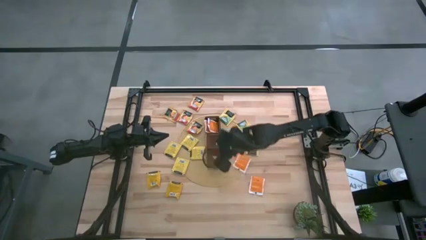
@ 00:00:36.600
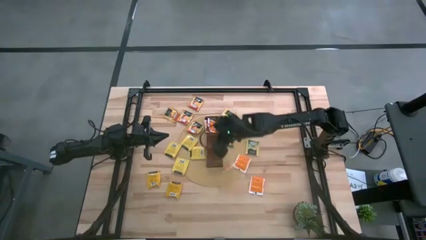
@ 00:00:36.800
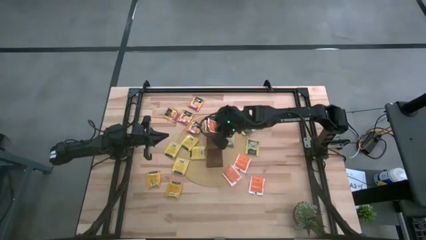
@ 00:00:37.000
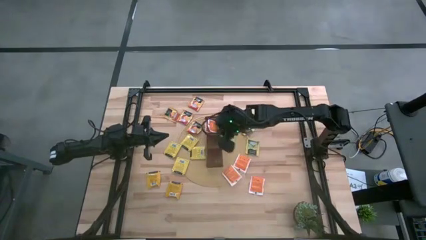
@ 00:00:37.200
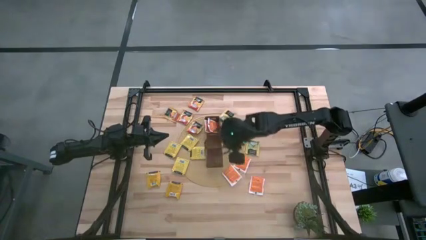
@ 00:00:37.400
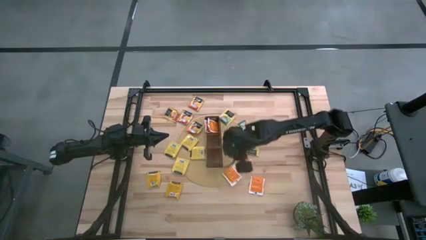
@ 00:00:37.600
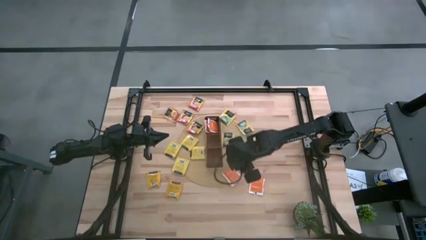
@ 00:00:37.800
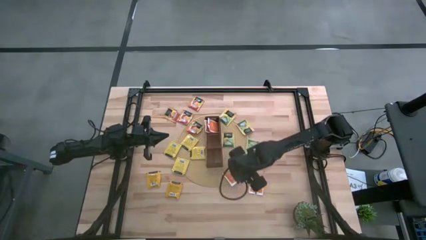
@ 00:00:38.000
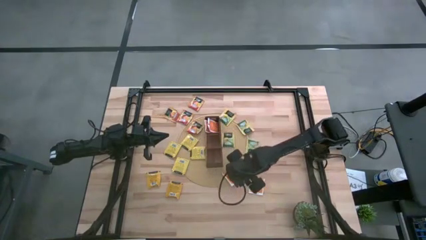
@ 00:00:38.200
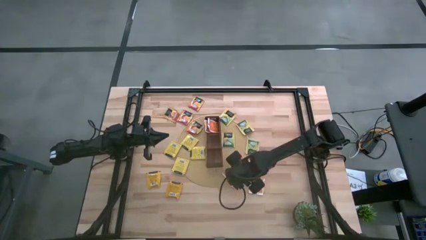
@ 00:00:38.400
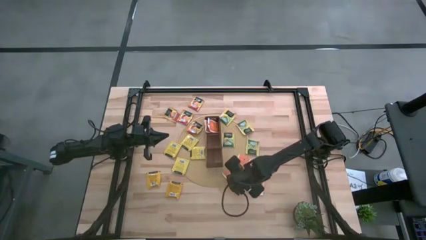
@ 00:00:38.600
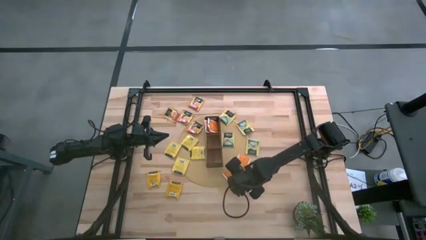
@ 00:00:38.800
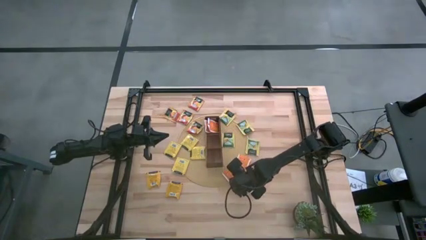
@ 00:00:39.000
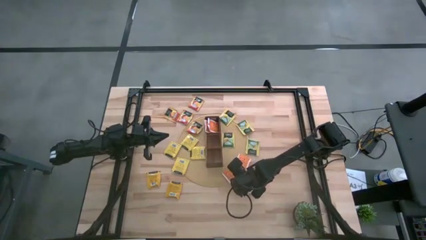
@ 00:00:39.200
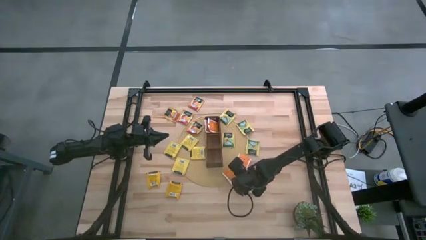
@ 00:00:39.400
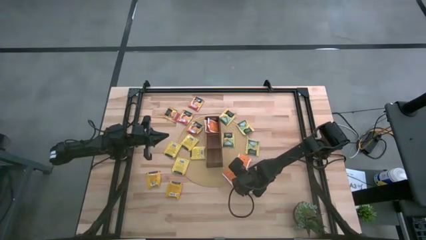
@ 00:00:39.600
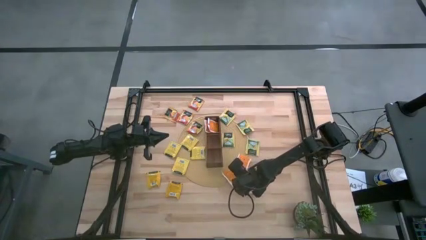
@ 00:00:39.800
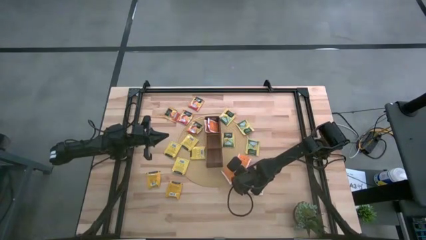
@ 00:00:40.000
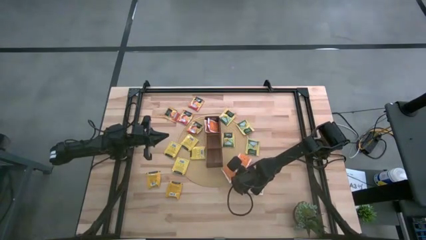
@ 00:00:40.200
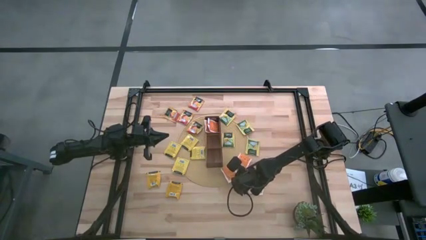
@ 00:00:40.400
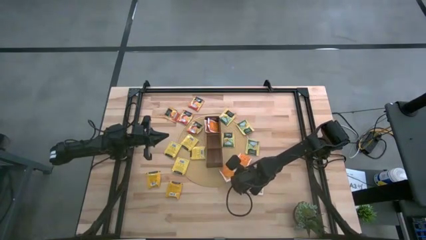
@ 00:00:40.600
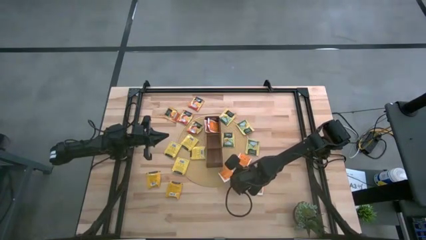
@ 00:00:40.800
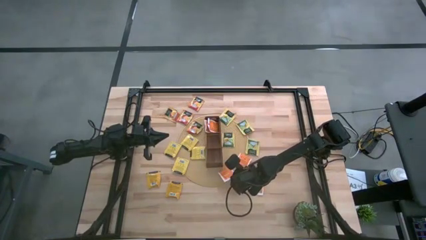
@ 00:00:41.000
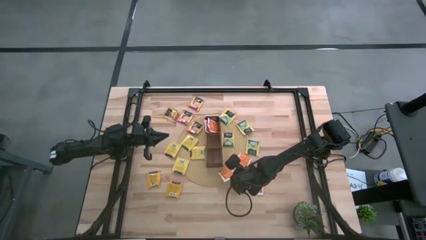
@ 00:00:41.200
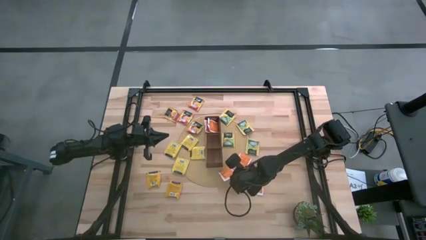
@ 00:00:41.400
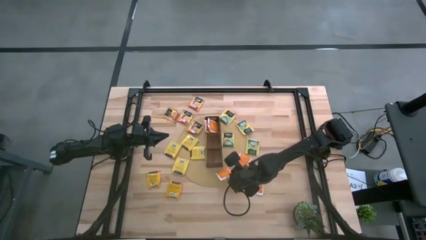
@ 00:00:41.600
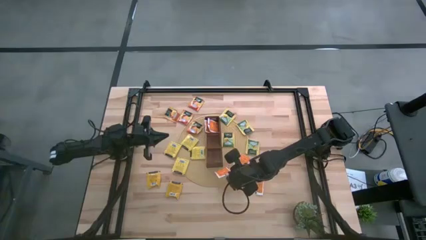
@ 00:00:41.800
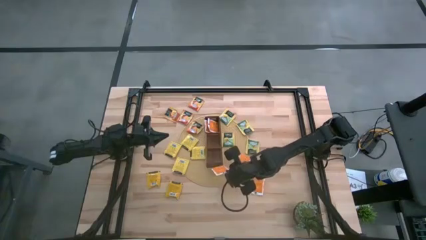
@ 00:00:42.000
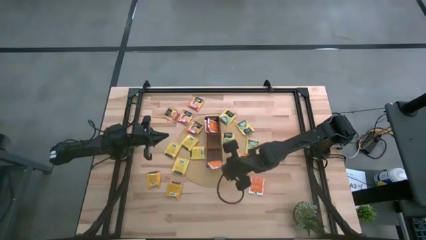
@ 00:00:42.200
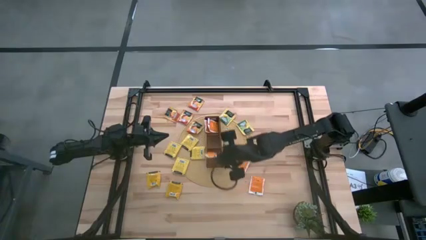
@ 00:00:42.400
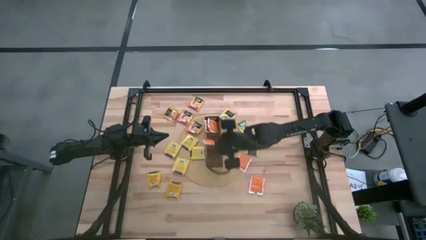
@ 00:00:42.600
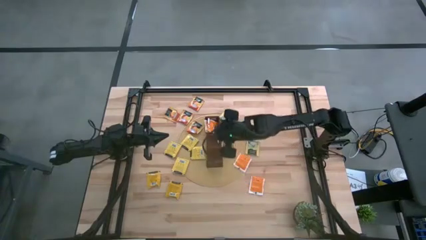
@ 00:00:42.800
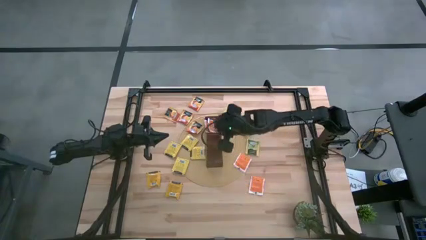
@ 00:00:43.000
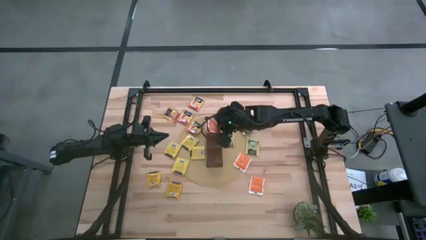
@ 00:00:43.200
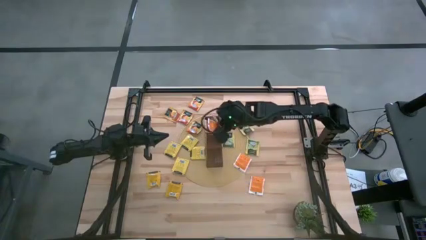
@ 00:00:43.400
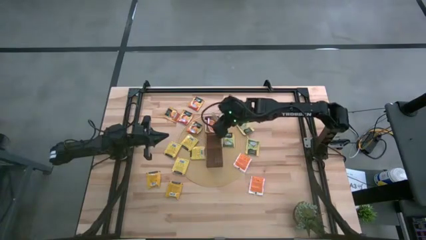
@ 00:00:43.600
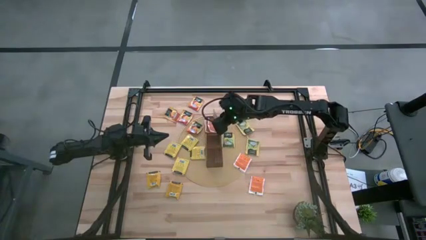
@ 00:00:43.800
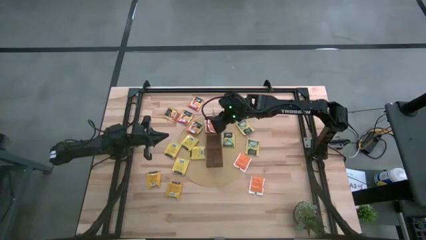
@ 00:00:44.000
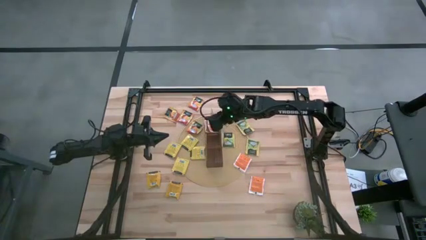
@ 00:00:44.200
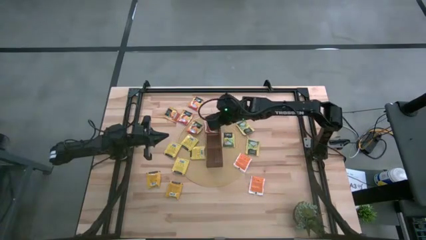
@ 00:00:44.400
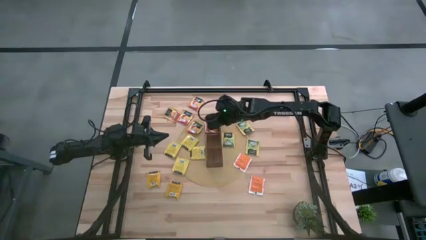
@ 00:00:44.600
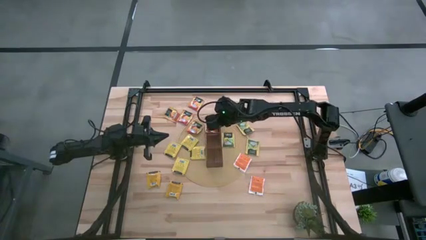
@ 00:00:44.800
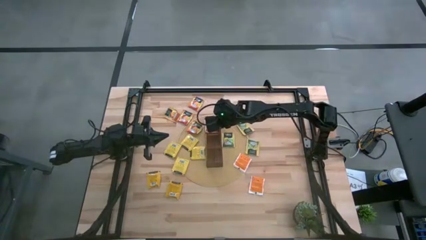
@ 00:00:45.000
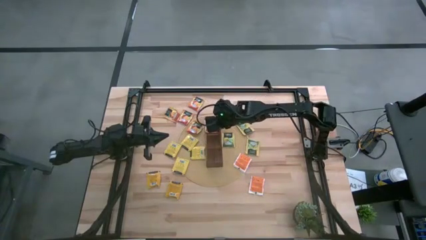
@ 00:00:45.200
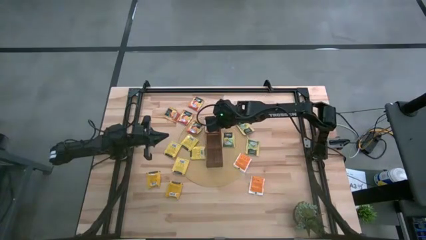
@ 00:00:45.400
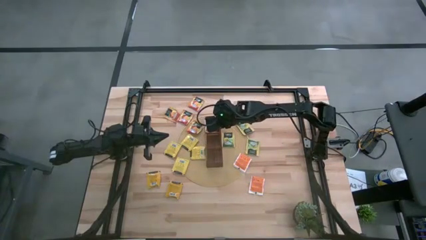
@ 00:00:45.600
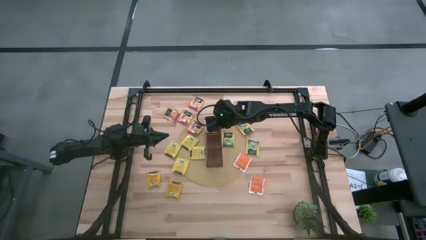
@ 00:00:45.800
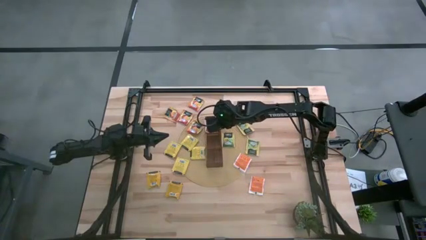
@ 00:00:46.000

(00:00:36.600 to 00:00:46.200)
Task: Pick & Place Tea
Put the bottom white tea bag into the top section of the wooden organizer

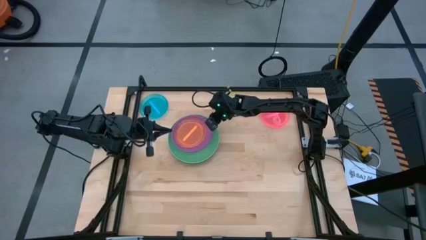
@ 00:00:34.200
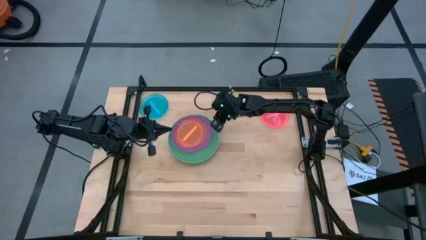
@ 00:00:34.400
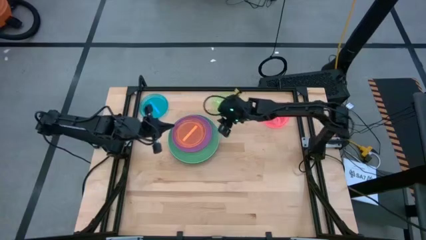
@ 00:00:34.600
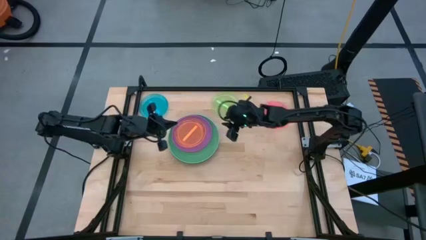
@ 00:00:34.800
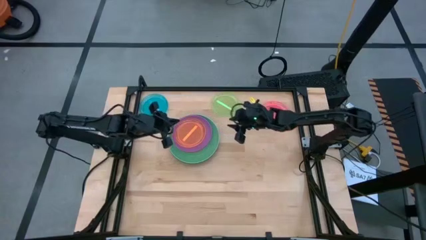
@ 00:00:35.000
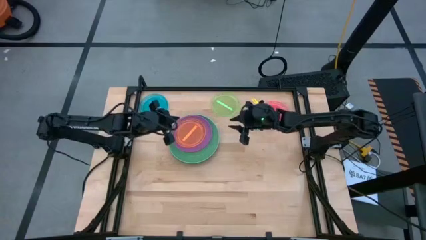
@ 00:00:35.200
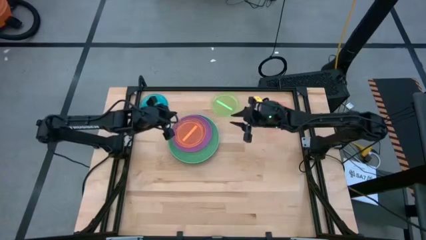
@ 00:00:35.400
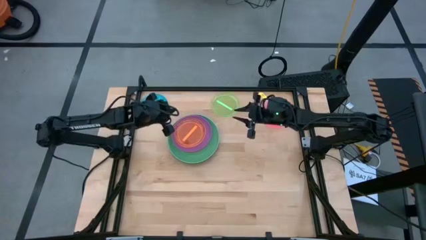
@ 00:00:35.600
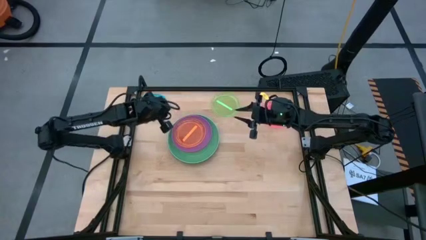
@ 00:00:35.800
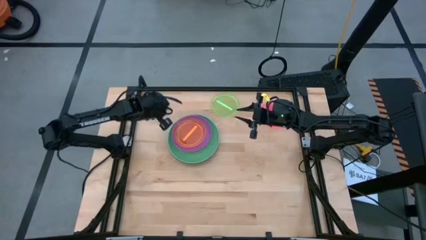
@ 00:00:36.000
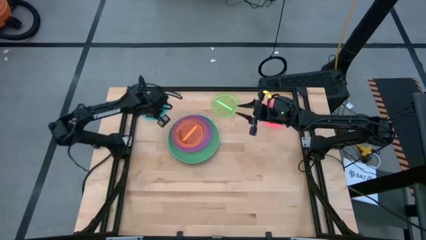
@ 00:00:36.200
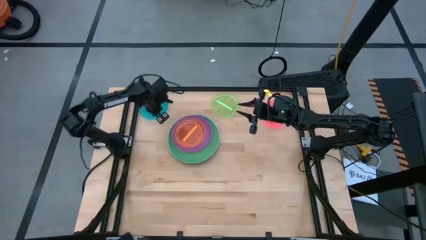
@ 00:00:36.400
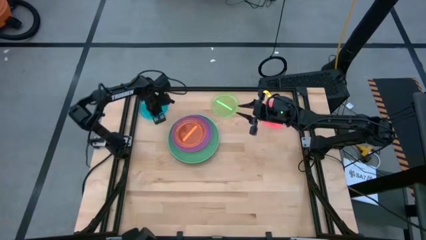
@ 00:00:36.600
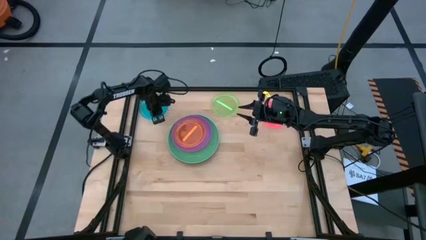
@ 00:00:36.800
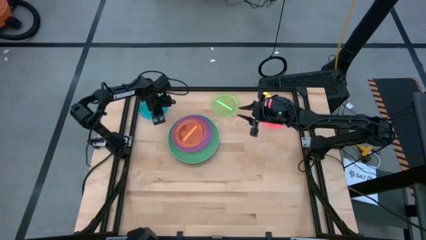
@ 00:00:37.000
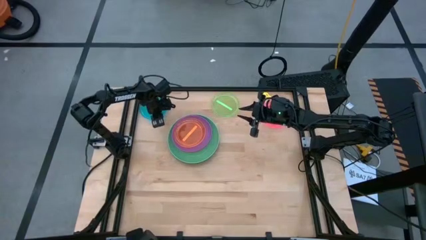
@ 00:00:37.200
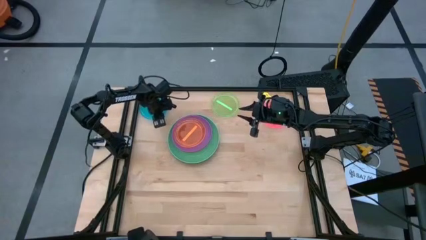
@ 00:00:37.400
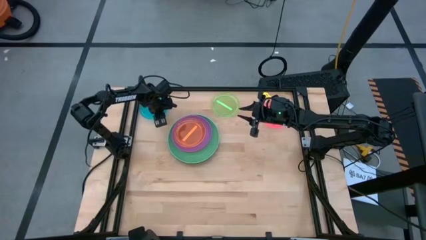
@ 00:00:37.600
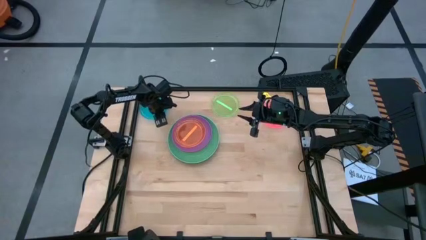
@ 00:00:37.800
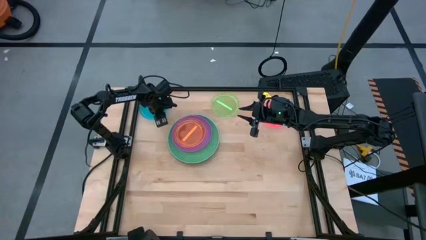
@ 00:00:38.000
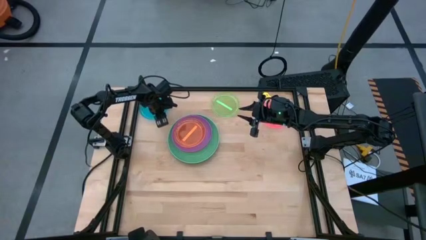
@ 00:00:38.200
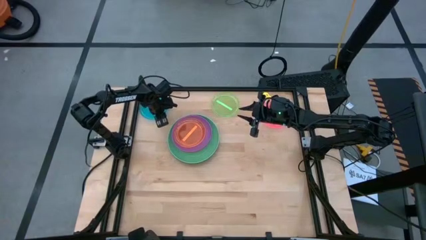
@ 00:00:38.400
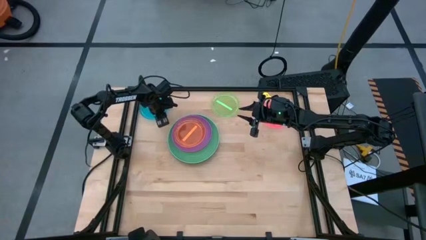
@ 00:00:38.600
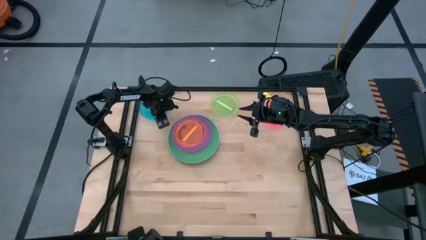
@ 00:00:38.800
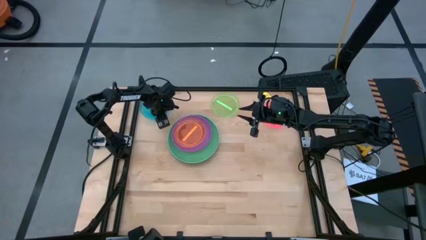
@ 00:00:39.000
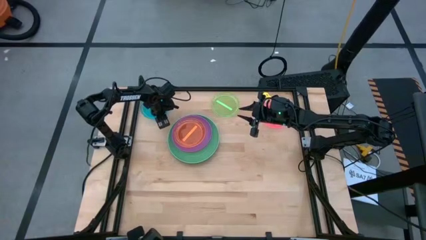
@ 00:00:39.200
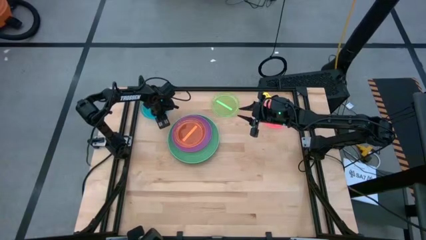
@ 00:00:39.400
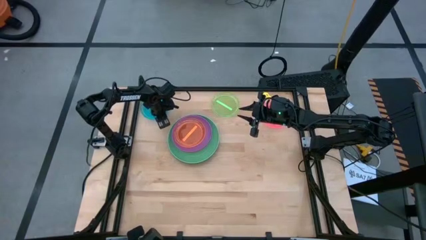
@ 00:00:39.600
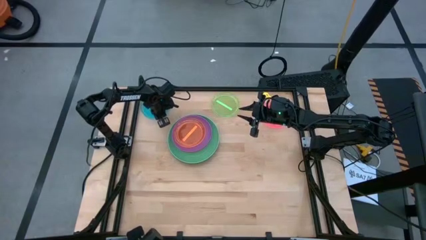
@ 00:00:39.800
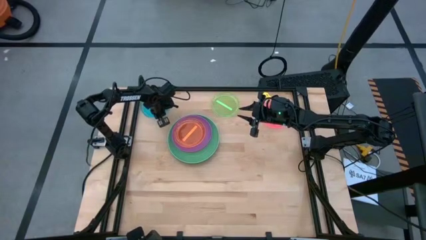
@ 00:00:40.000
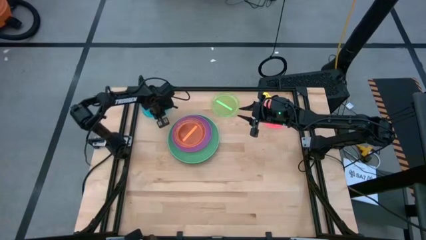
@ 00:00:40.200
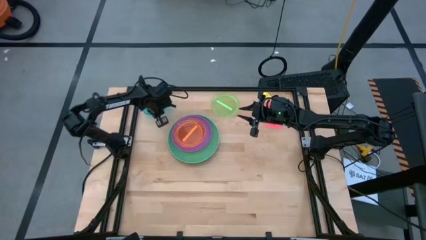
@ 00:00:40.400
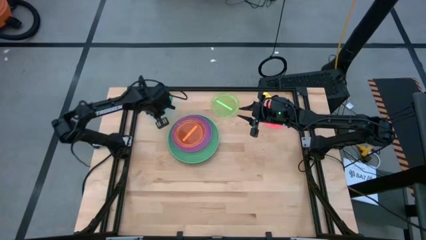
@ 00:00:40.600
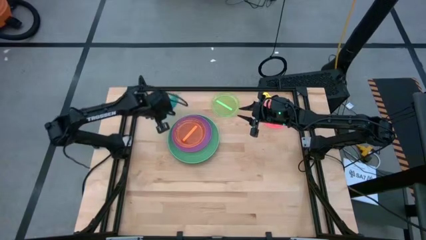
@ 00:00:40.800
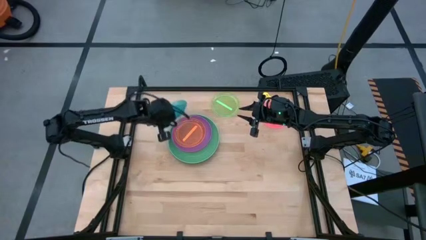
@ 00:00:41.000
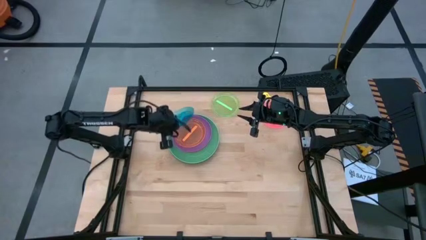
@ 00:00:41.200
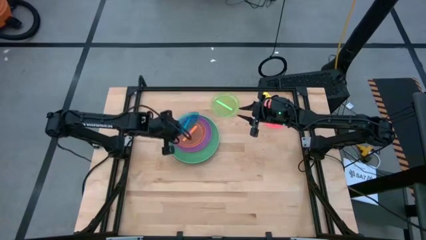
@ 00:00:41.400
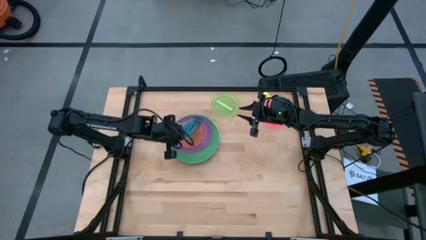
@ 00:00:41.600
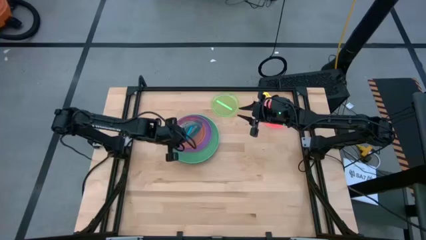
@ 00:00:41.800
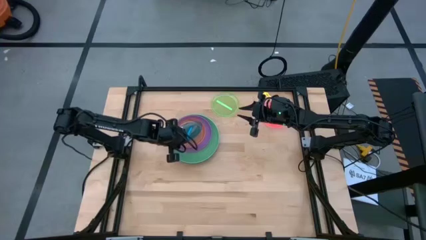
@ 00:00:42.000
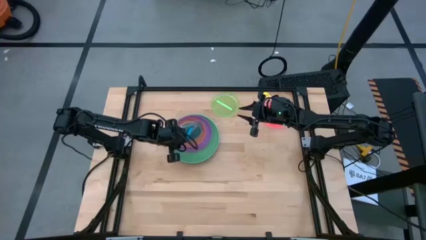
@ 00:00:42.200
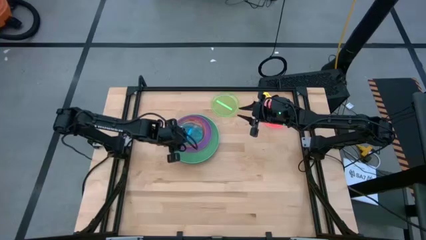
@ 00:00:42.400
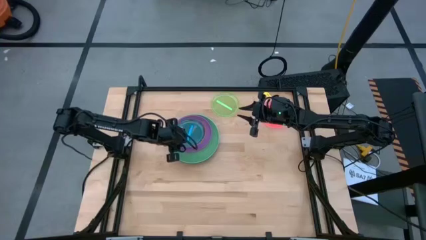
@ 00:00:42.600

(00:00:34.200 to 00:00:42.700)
Task: Stack plastic plates
Stack the transparent blue plate on top of the transparent orange plate
